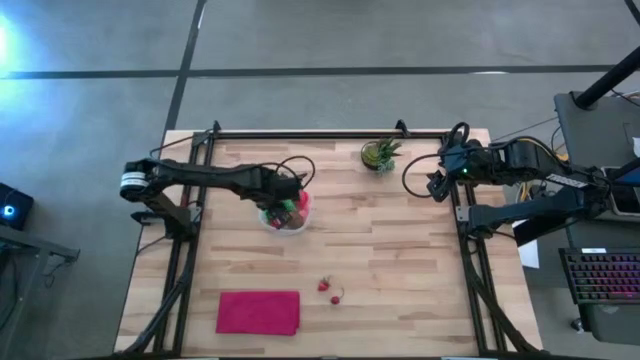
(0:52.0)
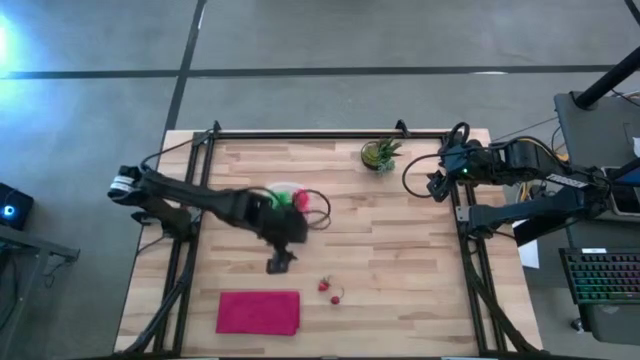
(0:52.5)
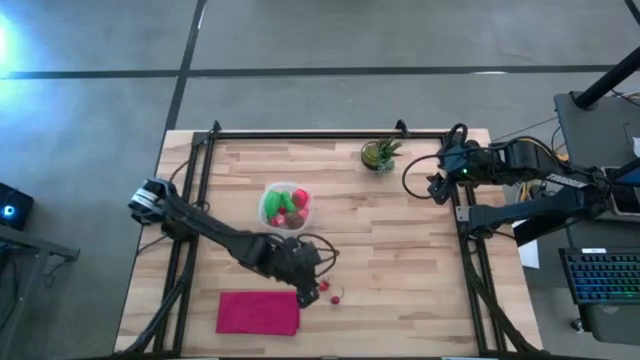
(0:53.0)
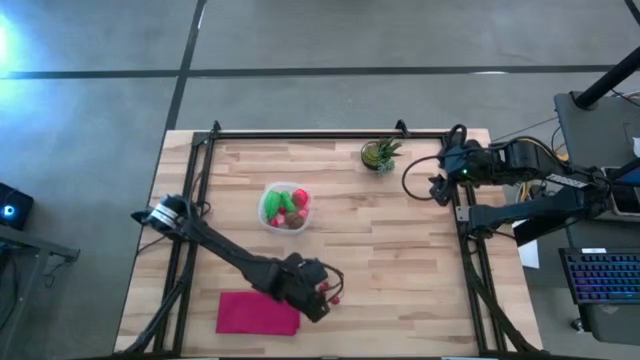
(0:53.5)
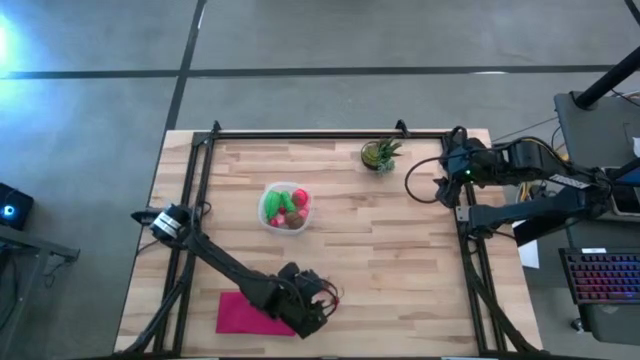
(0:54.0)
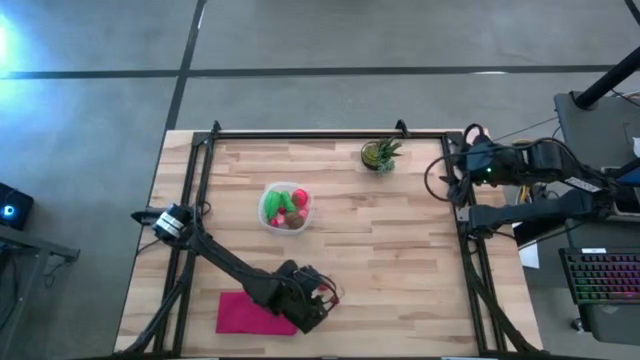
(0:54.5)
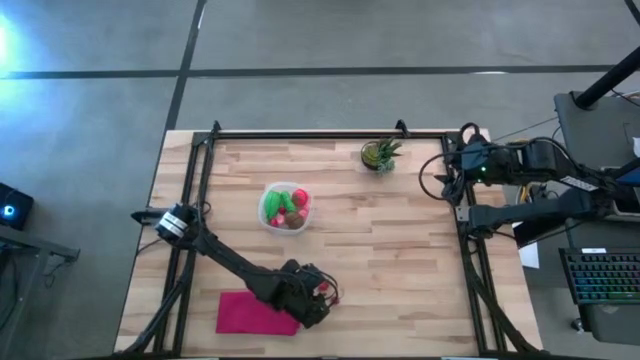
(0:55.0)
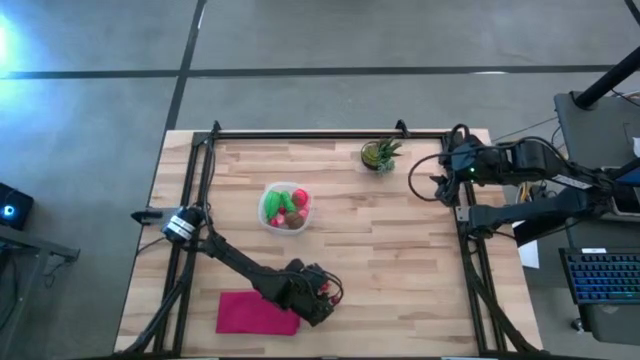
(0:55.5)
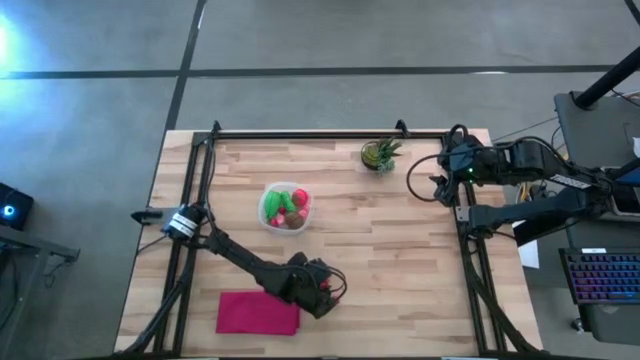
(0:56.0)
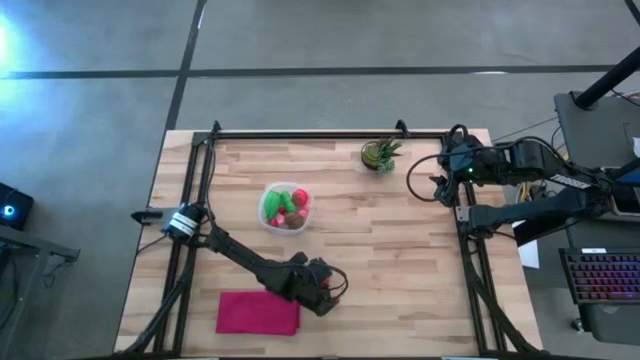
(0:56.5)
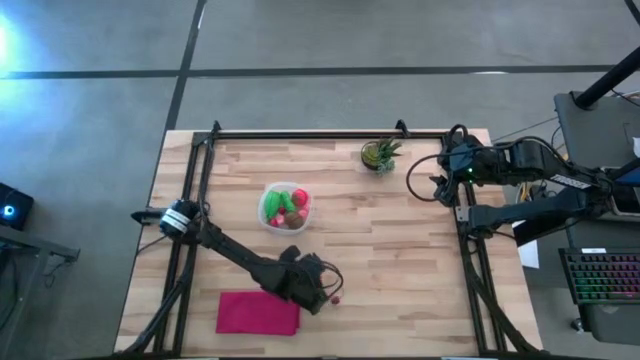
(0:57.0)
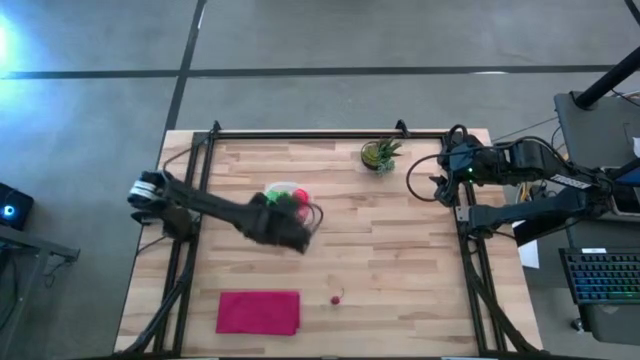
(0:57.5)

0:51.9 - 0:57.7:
Task: Pick and placing Produce into tupperware
Put the red strawberry into the transparent bin

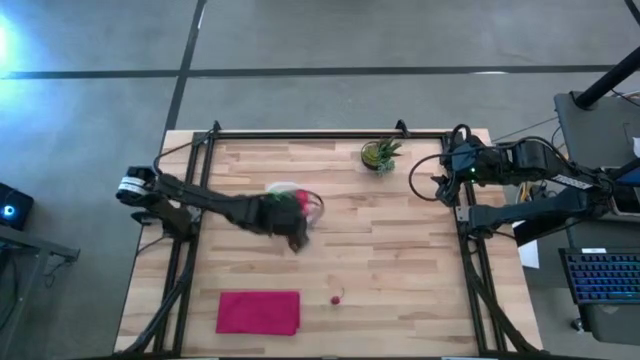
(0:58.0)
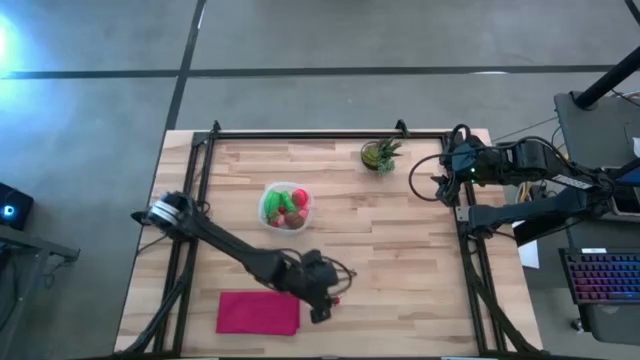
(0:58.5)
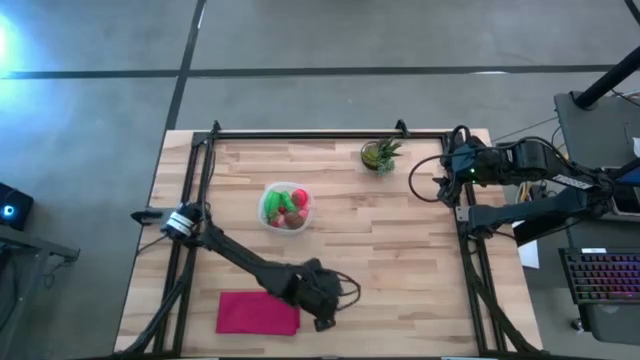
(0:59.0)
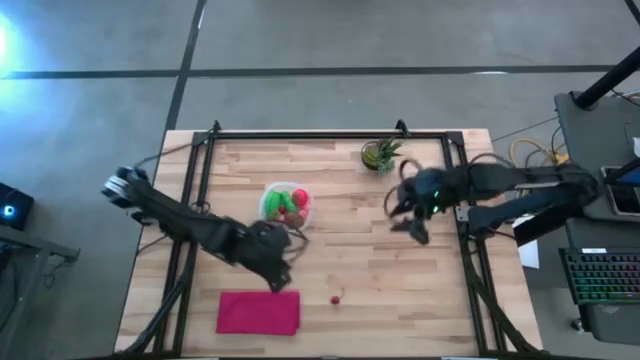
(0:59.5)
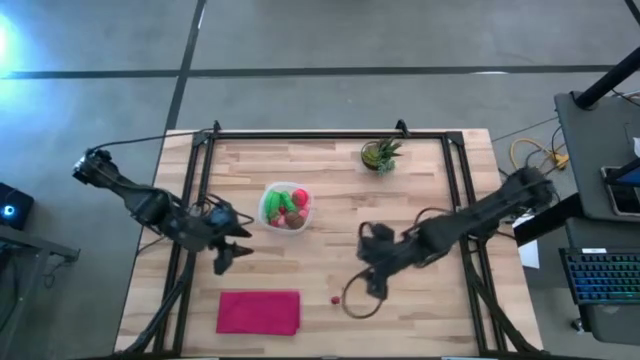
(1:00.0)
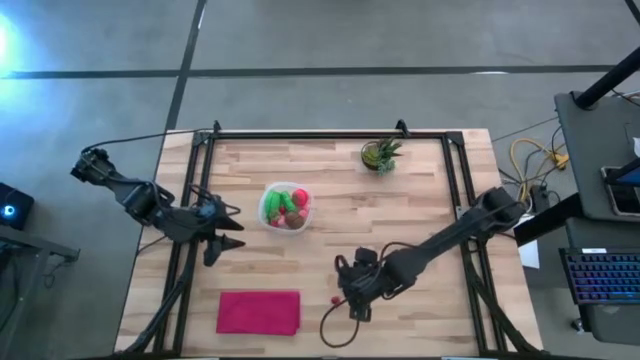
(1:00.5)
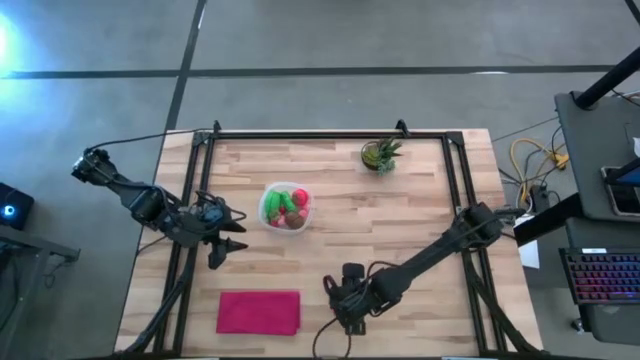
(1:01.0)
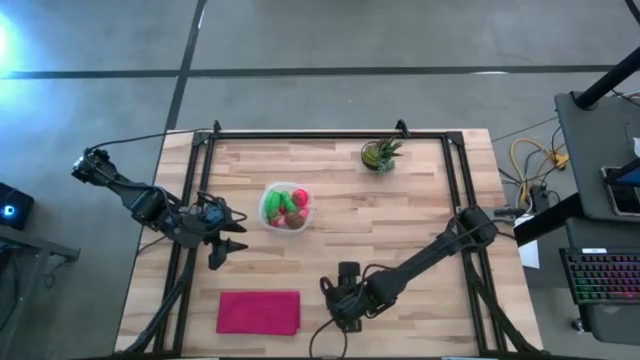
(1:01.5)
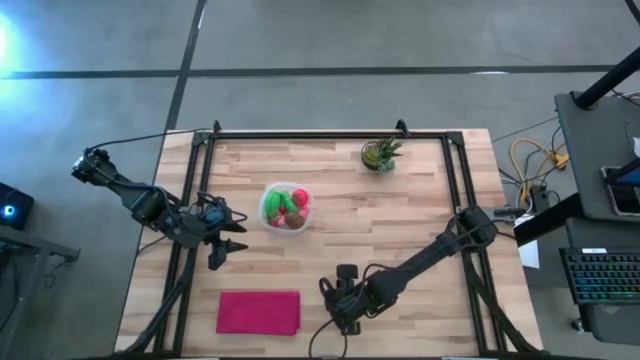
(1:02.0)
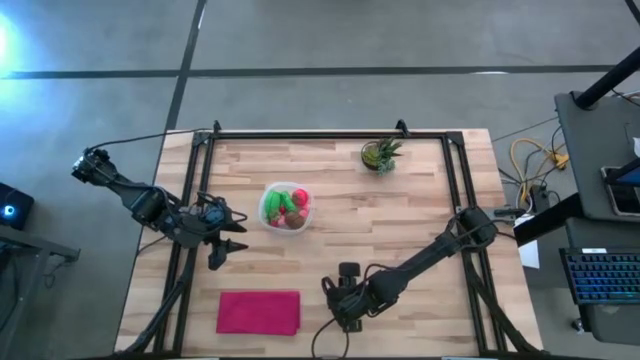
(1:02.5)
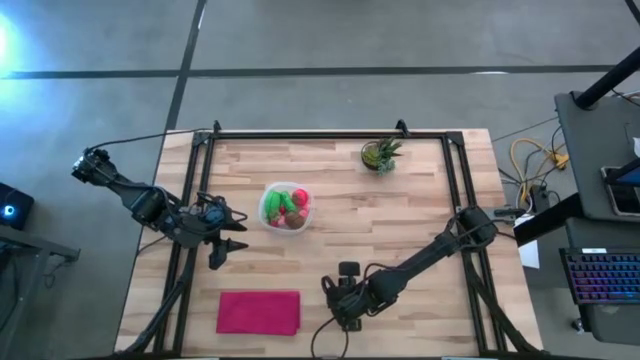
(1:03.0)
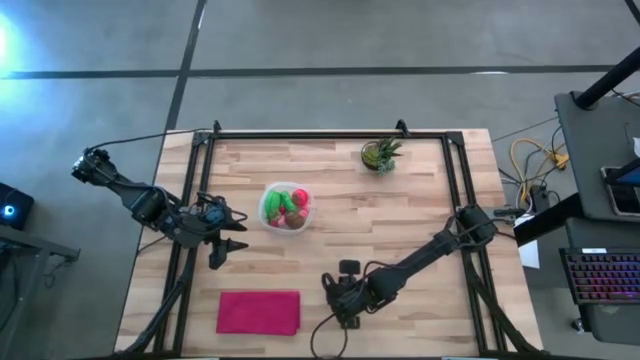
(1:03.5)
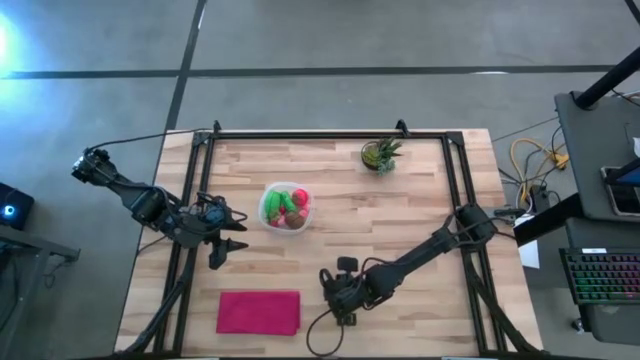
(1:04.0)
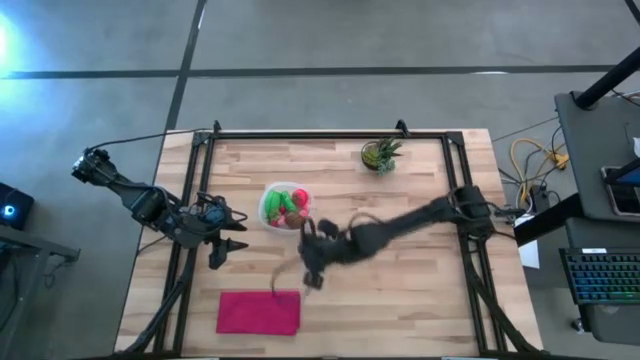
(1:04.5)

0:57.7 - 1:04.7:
Put the red cherry into the transparent bin

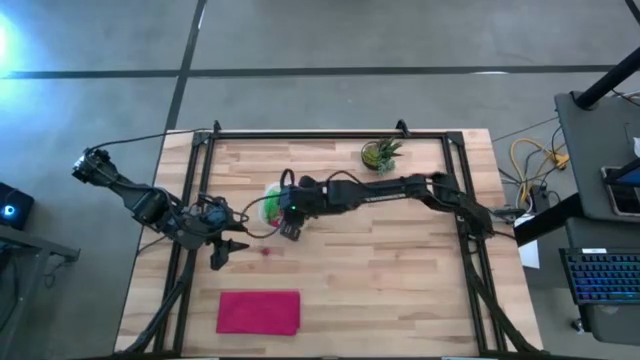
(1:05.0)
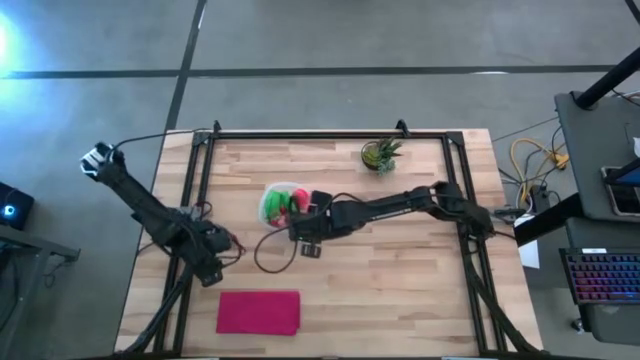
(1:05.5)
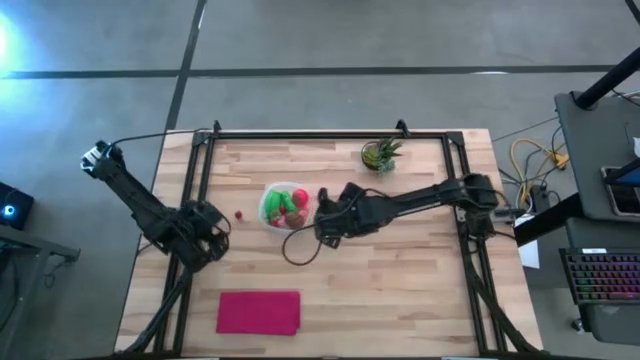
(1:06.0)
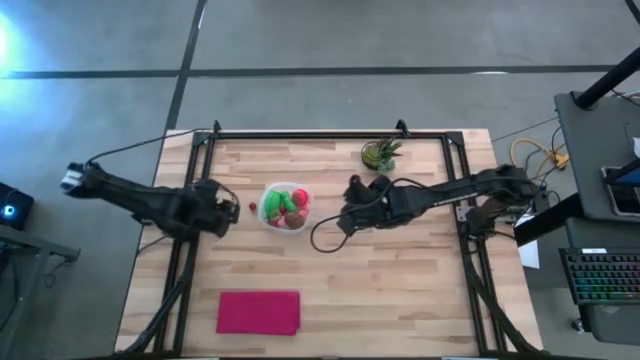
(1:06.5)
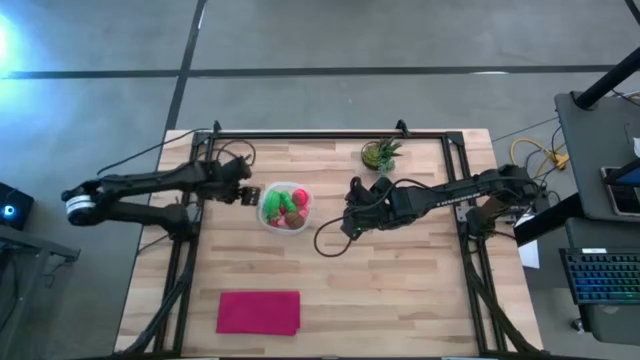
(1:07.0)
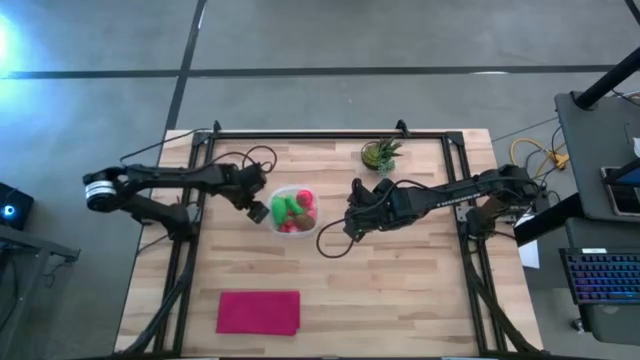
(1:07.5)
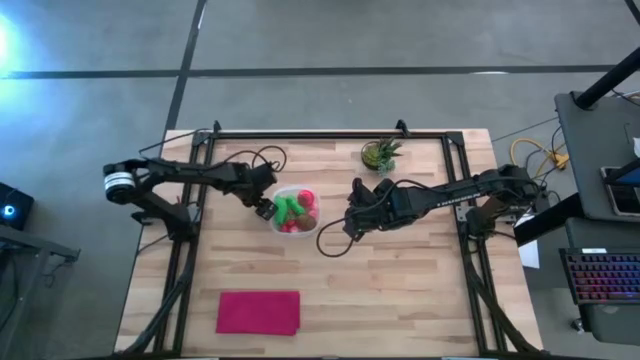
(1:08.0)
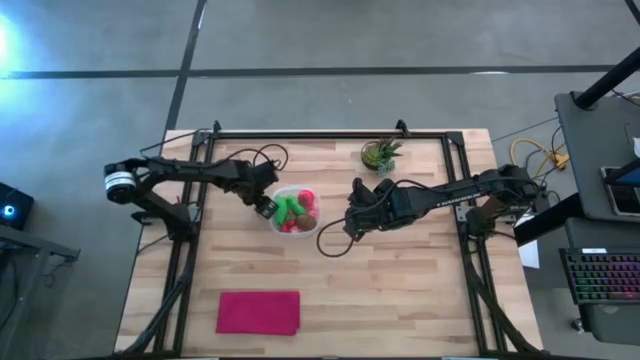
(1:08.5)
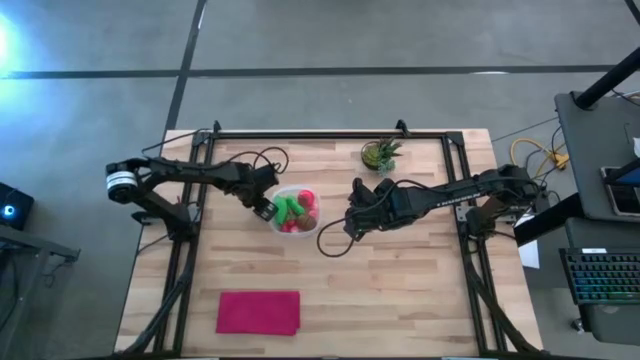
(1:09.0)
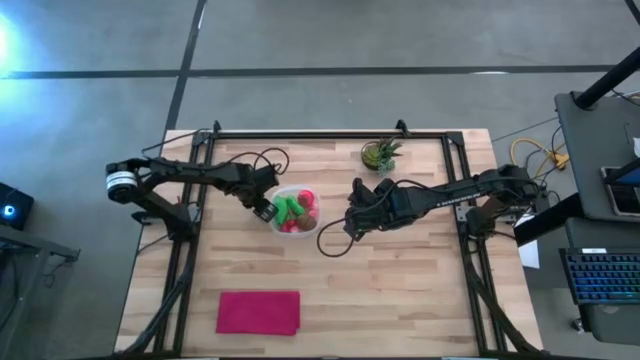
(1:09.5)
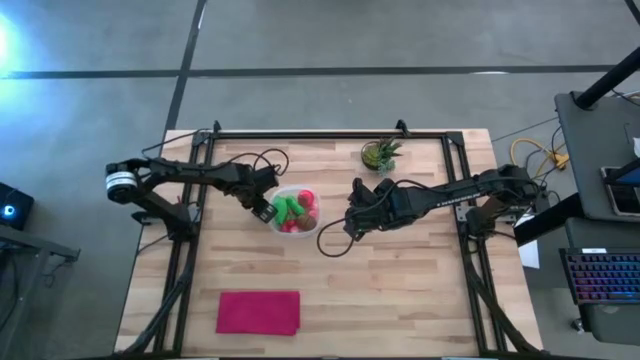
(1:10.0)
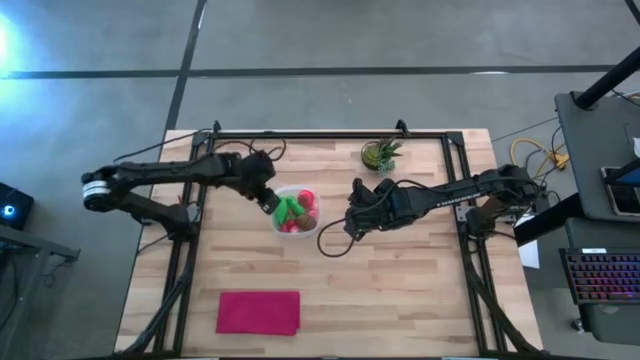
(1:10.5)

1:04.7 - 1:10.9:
Put the red cherry into the transparent bin

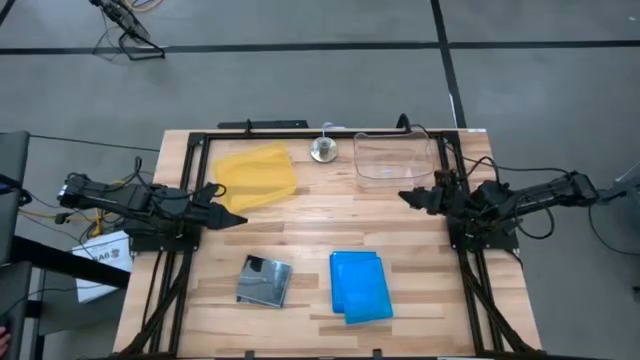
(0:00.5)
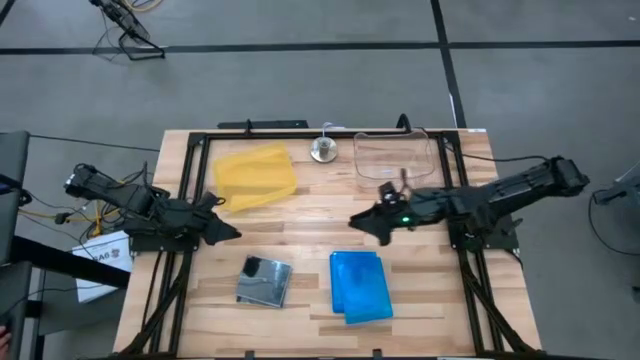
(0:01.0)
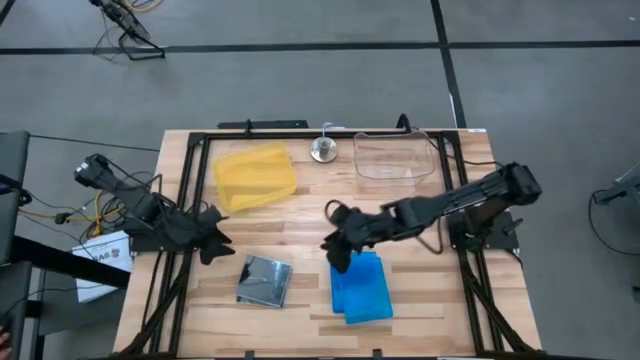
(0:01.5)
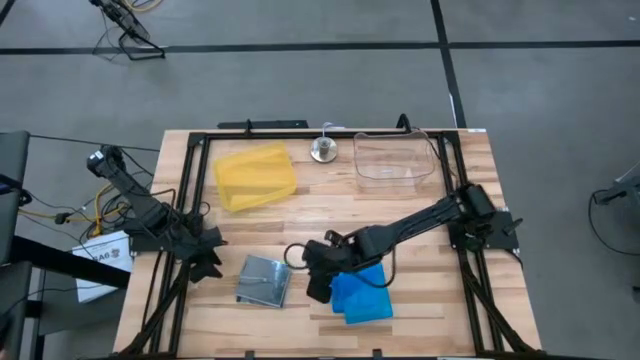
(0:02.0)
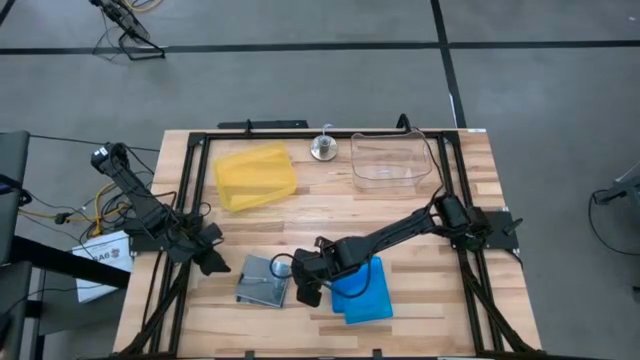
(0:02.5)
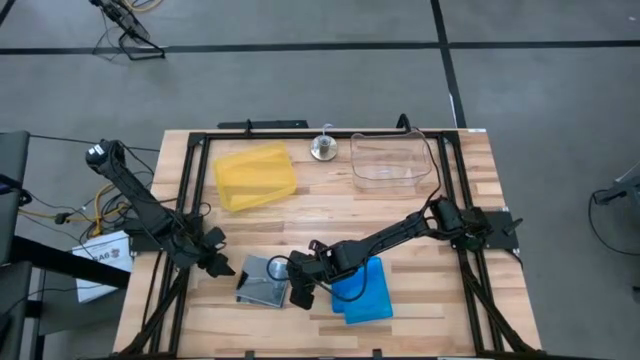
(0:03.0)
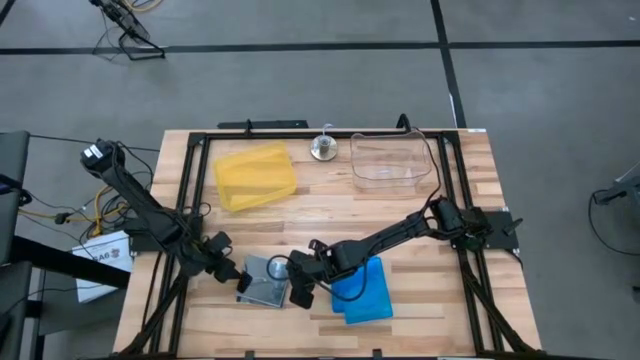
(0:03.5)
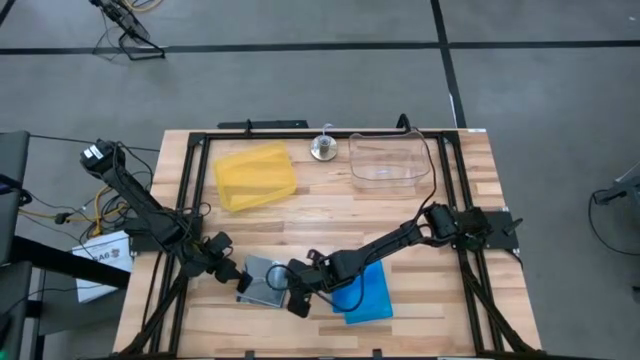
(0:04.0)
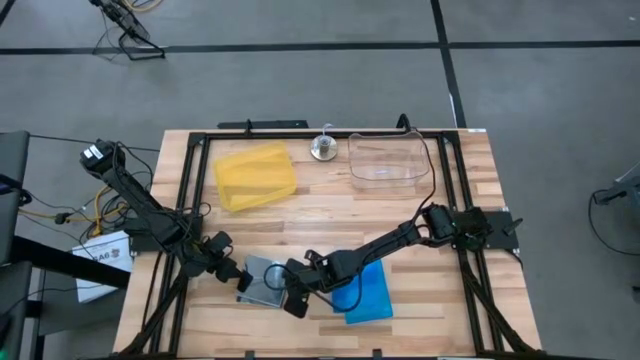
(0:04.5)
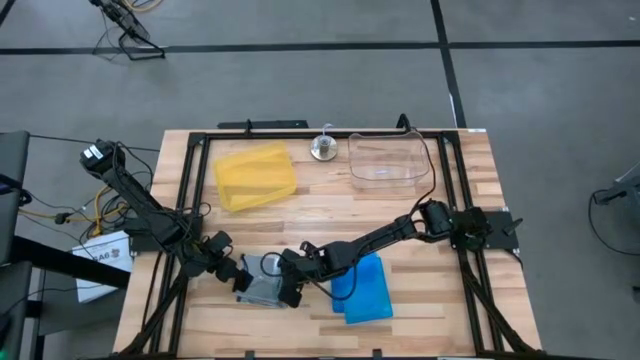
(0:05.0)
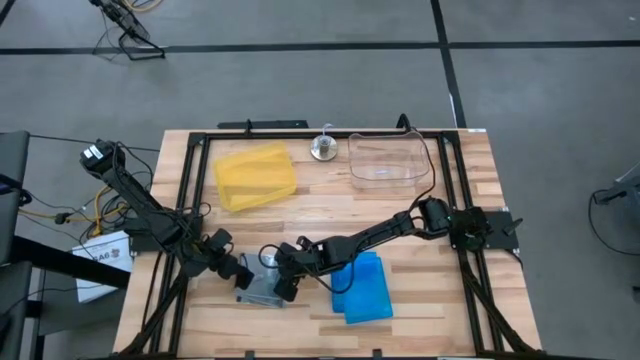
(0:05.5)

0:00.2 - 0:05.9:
Task: Pick & place jewel cases by type
Put the top black CD case into the yellow bin
